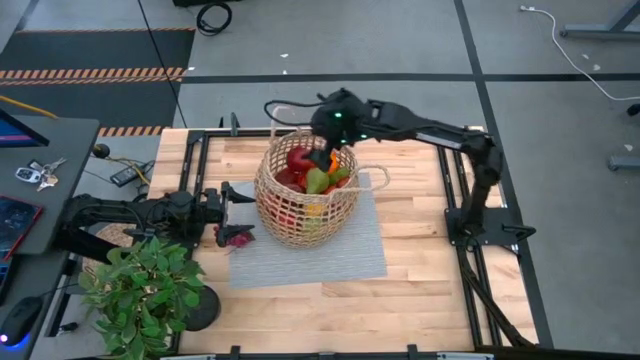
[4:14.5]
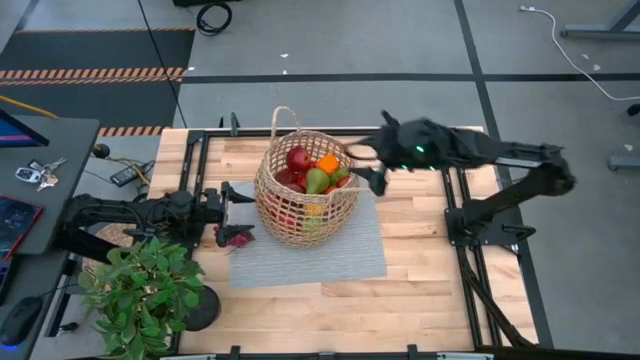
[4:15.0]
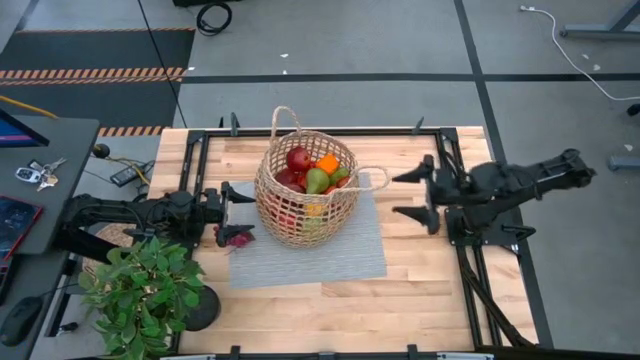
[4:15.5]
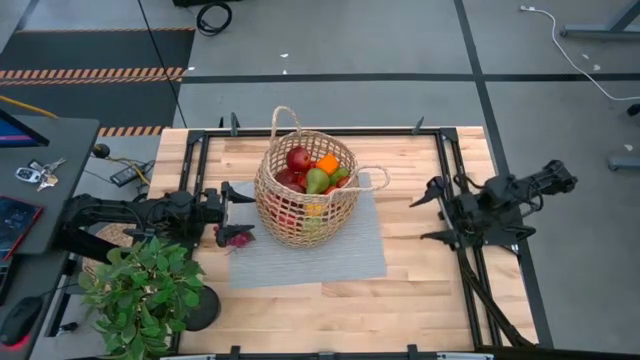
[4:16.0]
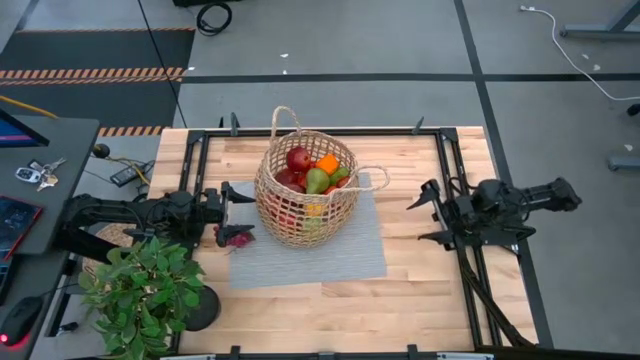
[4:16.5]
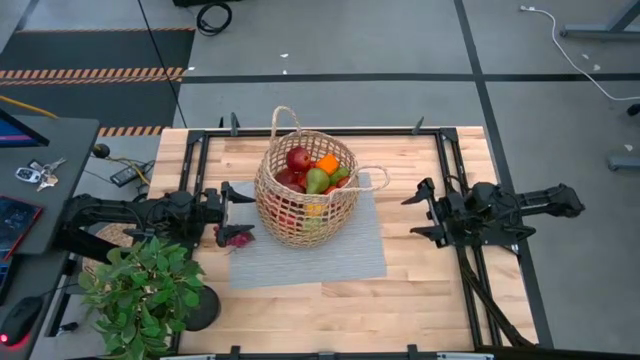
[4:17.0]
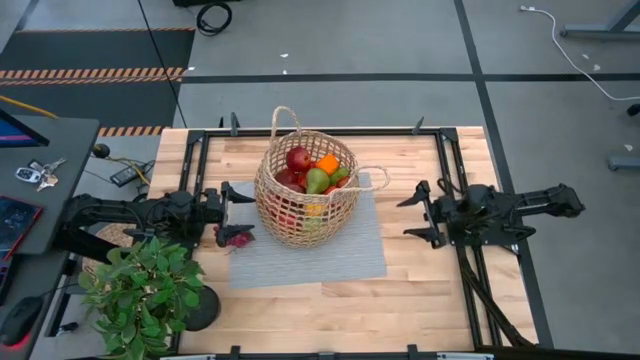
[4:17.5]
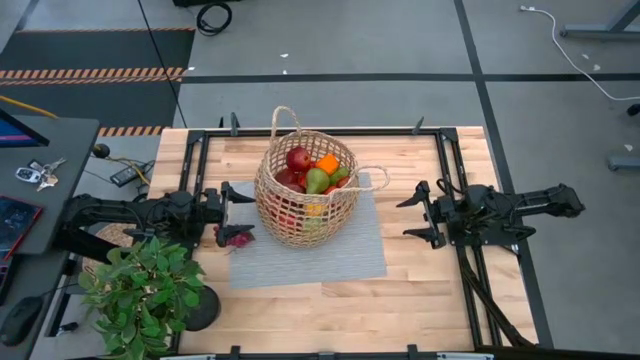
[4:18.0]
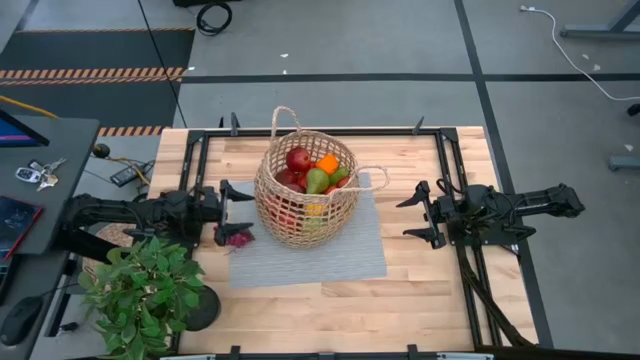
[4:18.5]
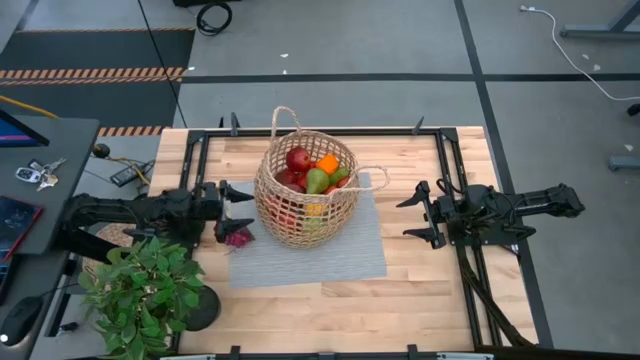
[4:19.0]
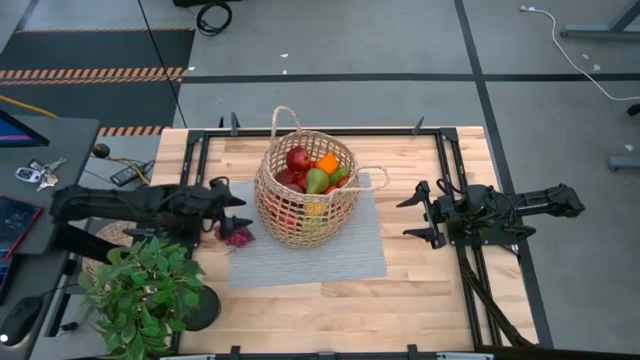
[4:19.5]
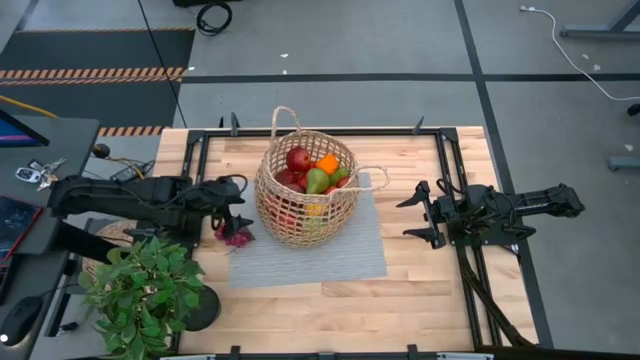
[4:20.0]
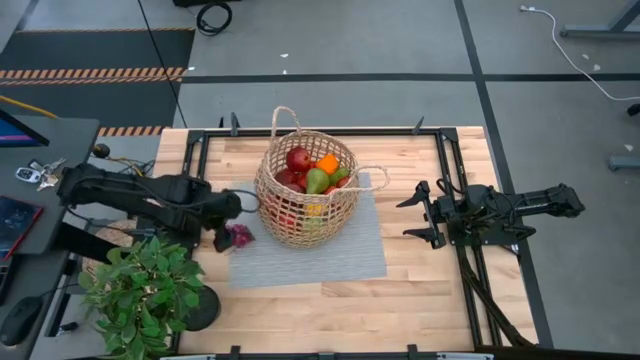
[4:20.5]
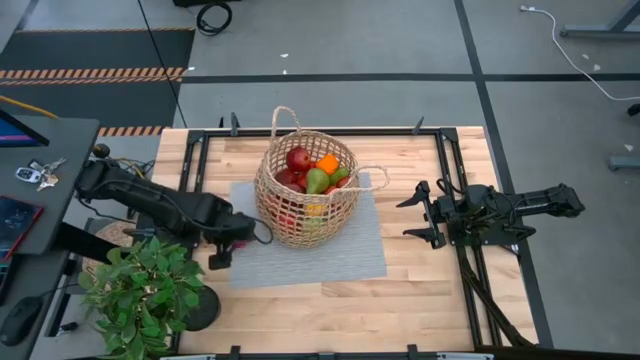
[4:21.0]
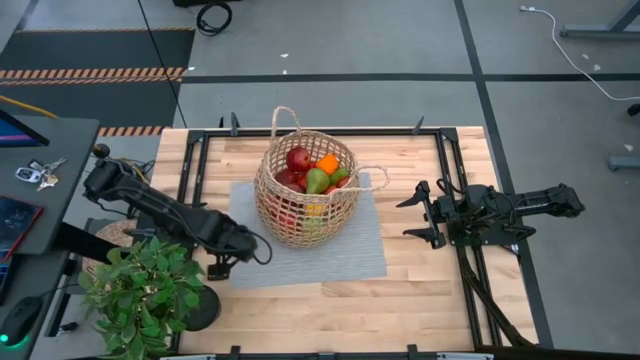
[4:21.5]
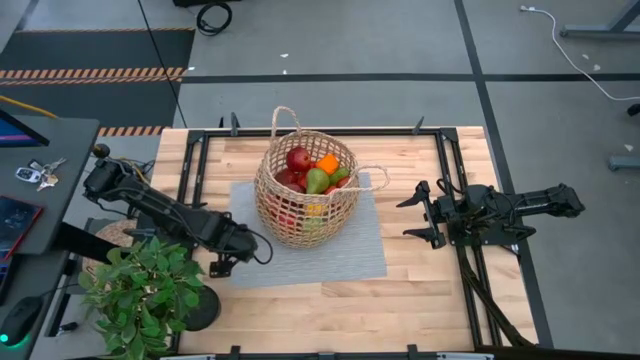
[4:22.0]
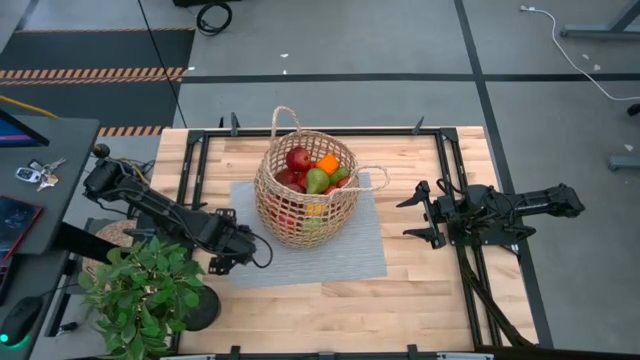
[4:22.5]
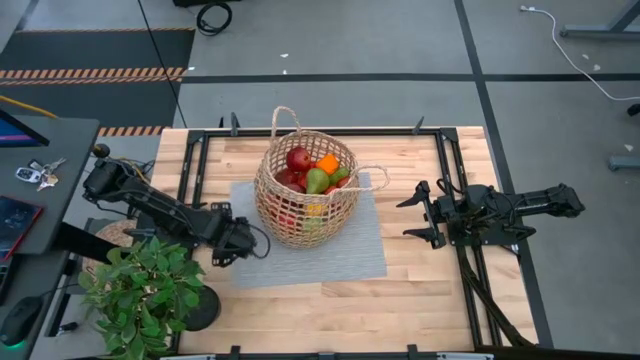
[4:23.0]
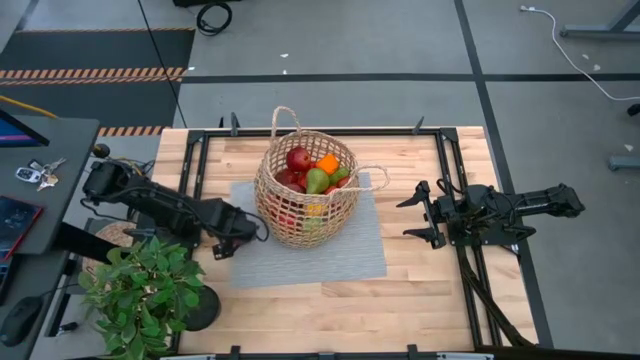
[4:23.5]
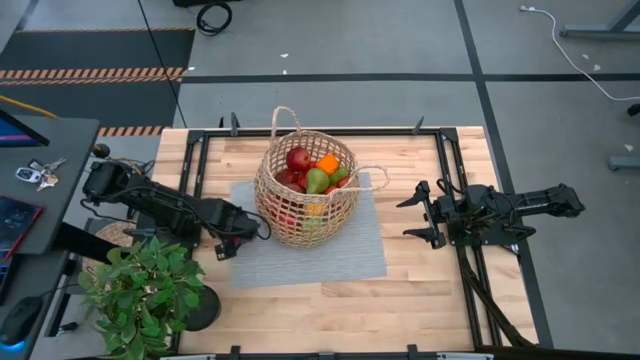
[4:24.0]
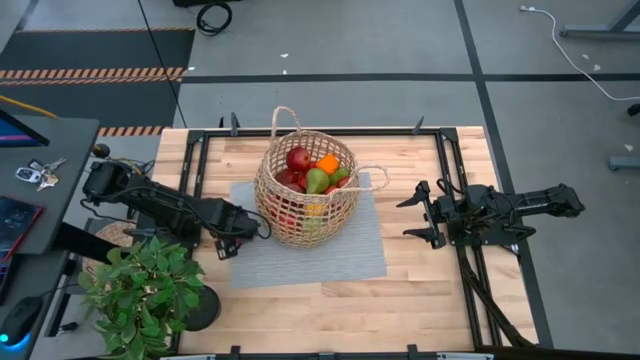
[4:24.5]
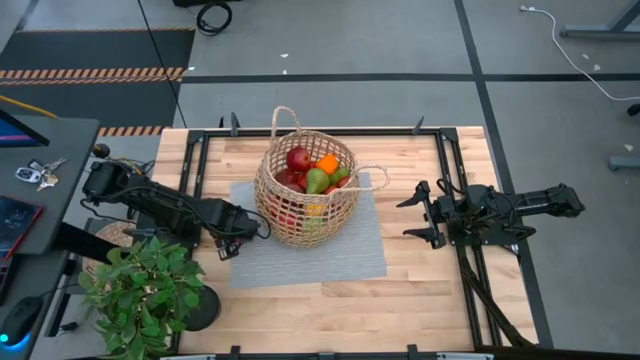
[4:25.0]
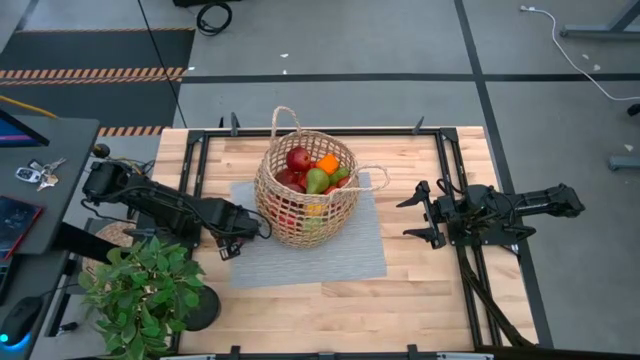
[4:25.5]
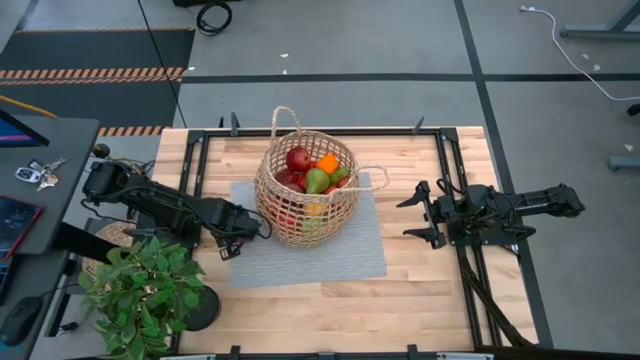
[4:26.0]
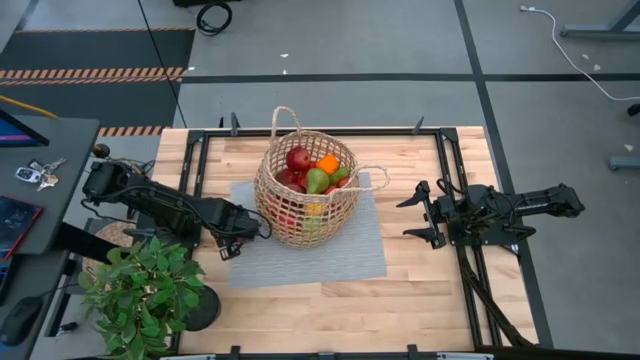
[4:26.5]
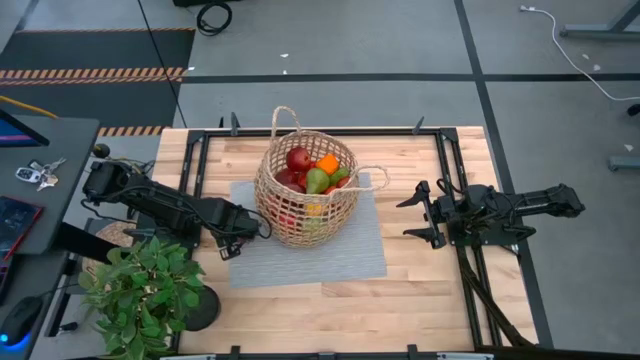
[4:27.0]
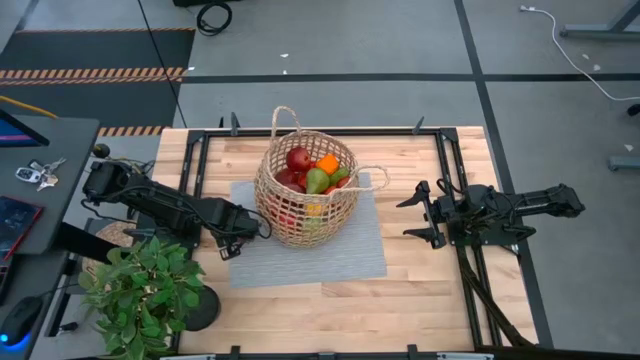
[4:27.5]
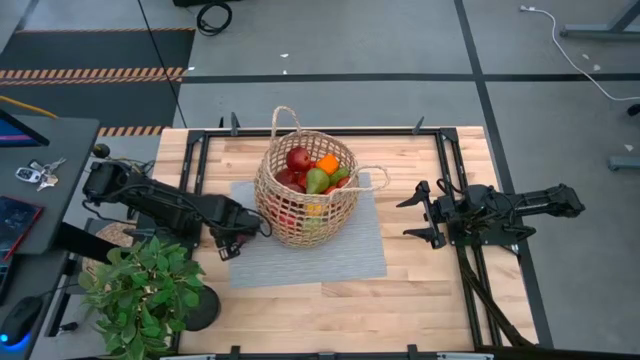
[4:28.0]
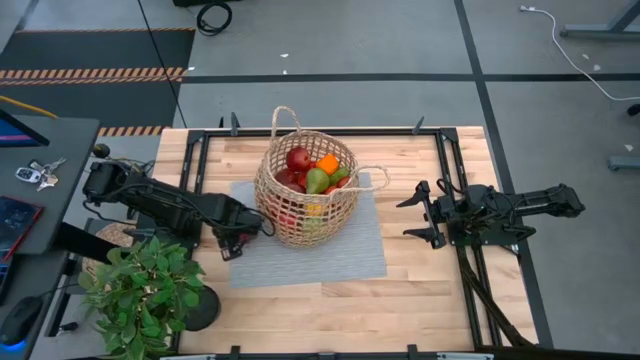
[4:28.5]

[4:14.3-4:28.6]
Task: Build produce basket
Put the red grapes into the brown basket

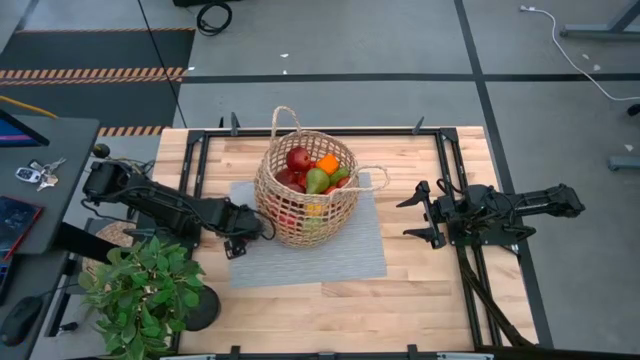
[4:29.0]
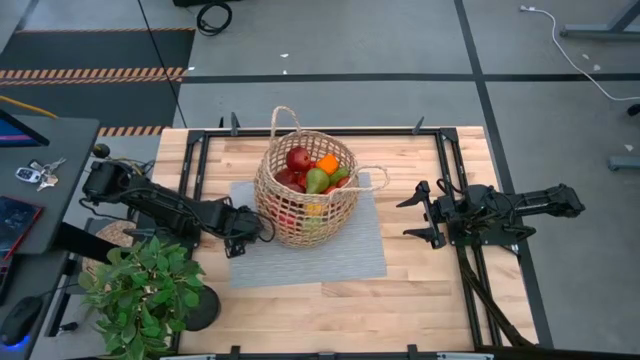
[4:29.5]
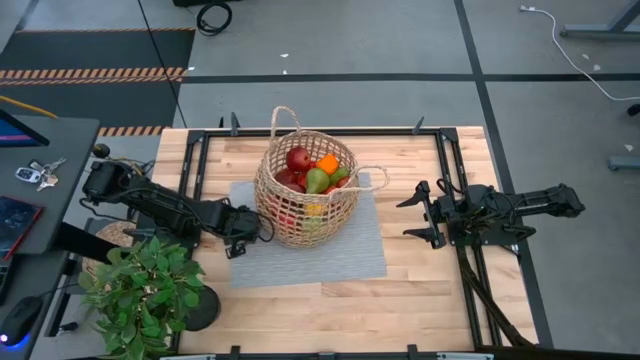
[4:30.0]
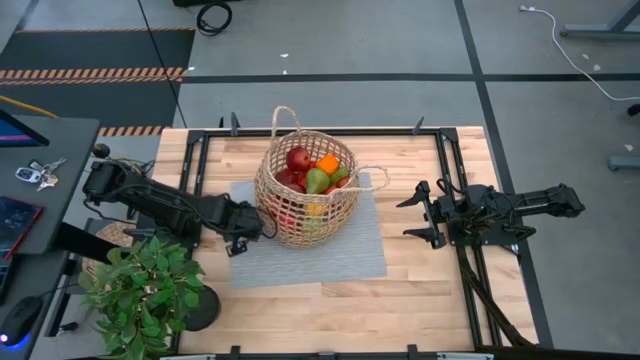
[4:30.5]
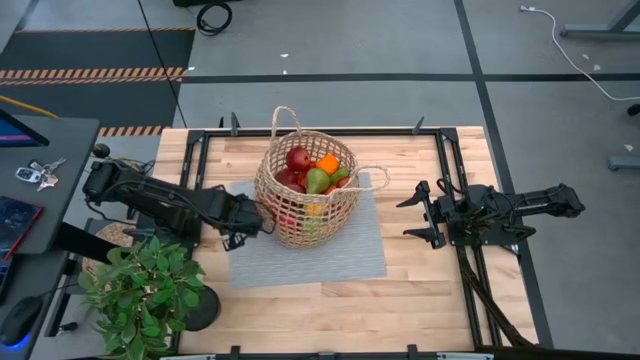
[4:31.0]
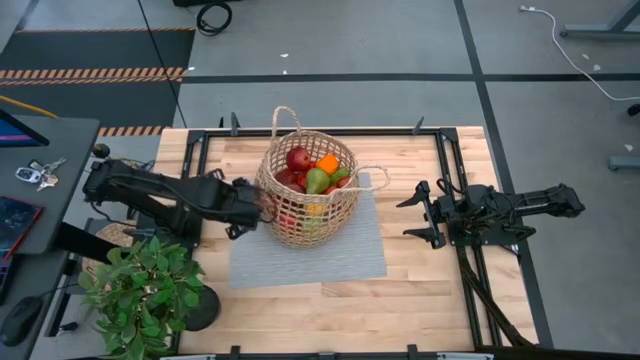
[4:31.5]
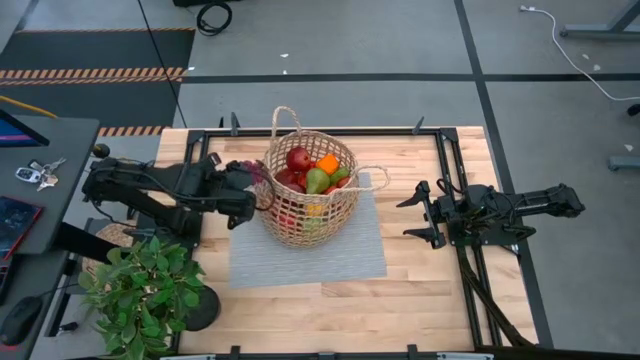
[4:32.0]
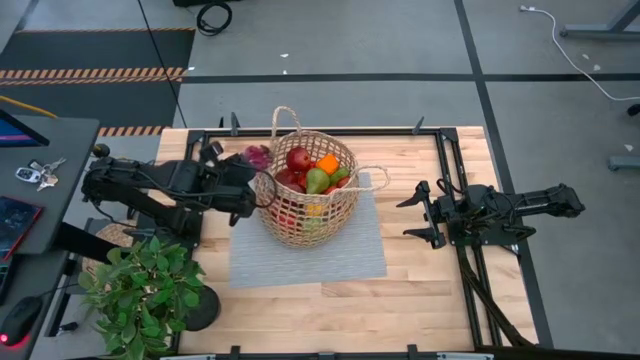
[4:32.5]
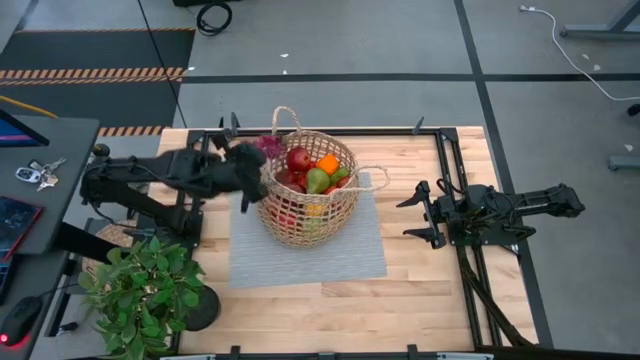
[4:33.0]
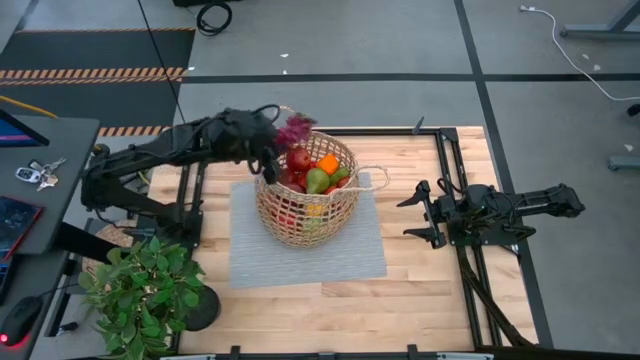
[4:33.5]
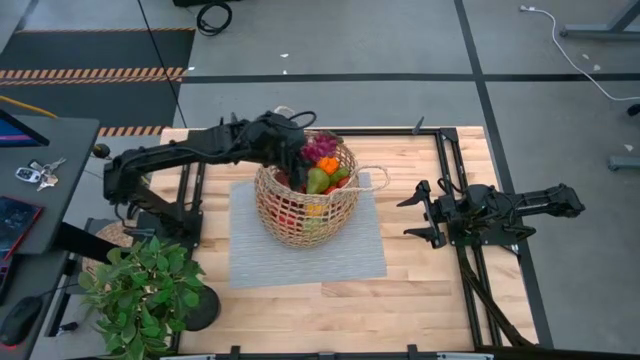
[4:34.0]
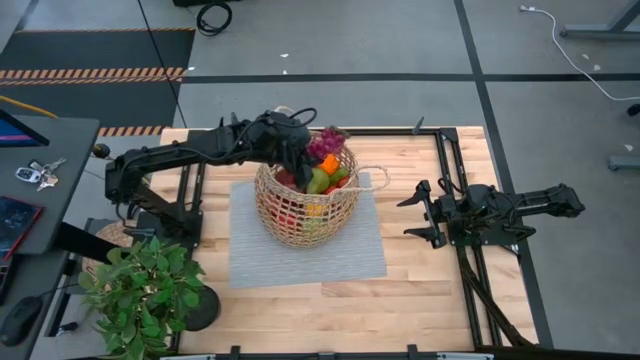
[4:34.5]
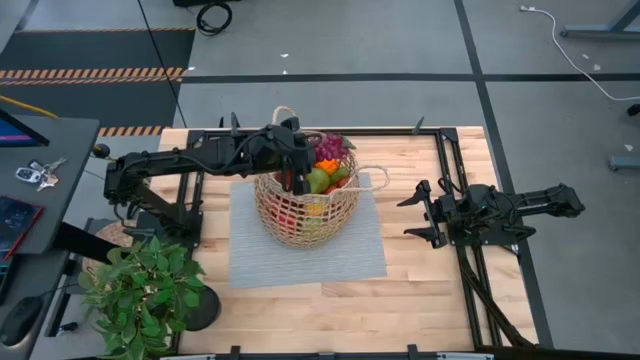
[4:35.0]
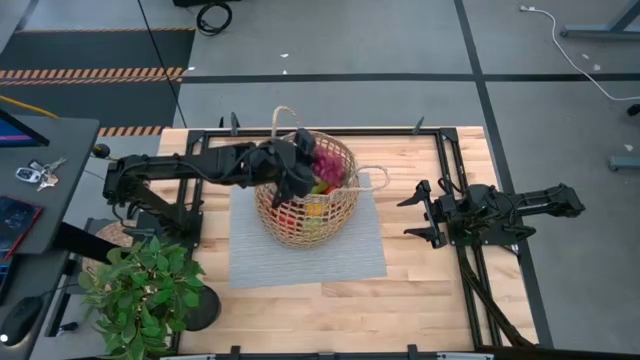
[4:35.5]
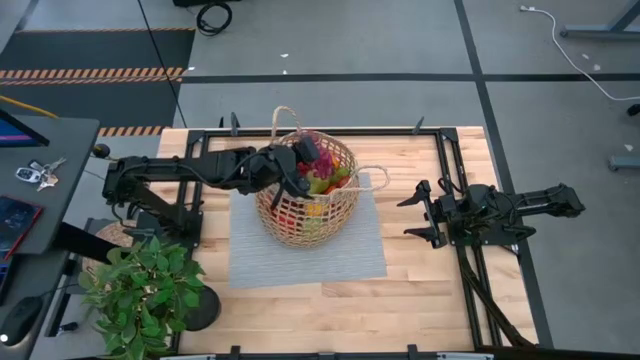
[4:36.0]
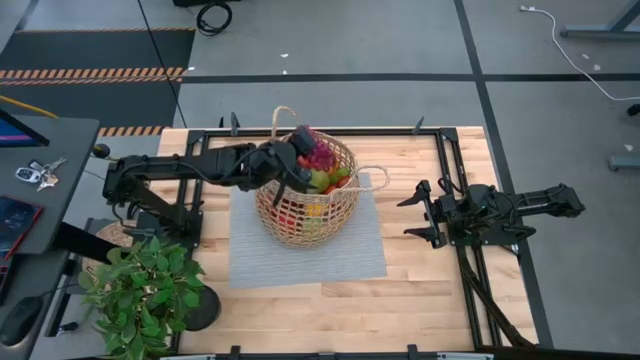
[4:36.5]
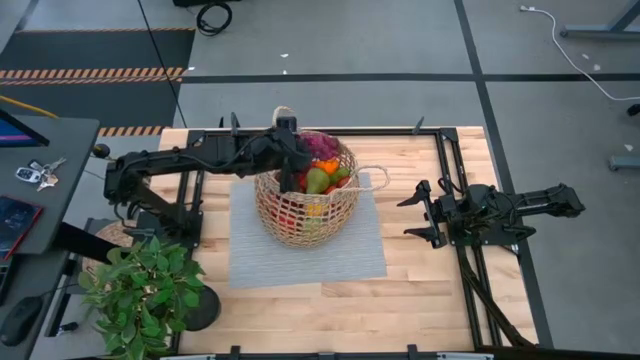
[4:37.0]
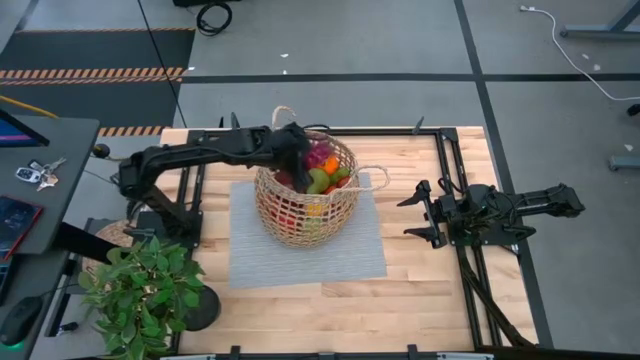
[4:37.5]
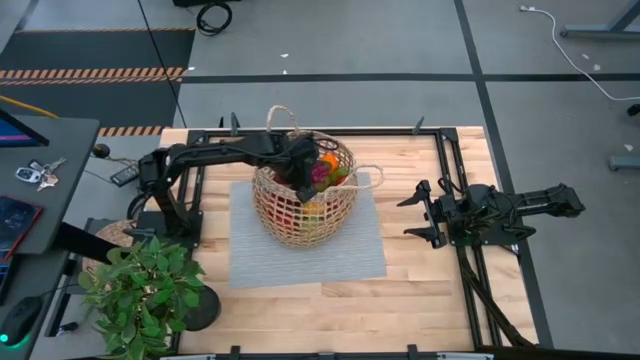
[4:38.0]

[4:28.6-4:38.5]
Put the red grapes into the brown basket
